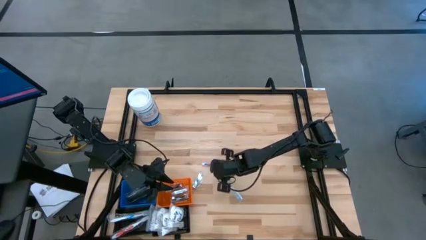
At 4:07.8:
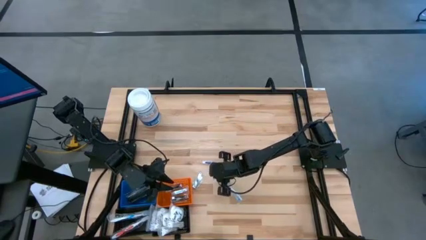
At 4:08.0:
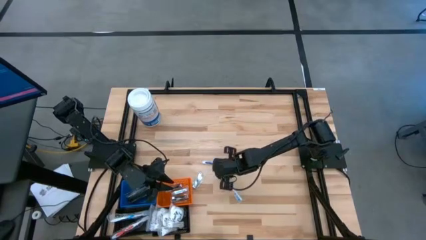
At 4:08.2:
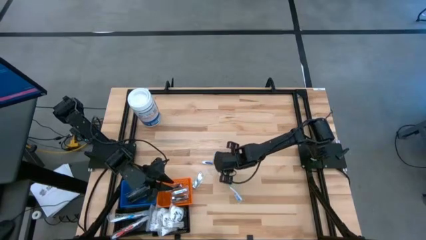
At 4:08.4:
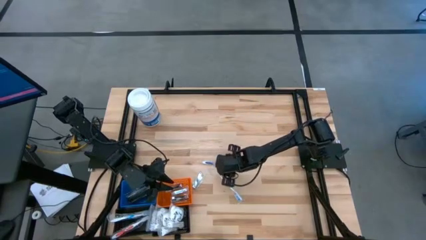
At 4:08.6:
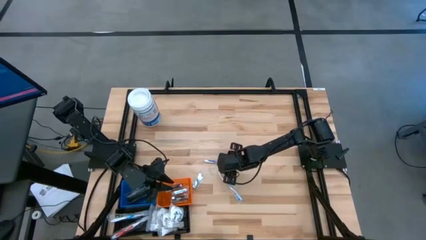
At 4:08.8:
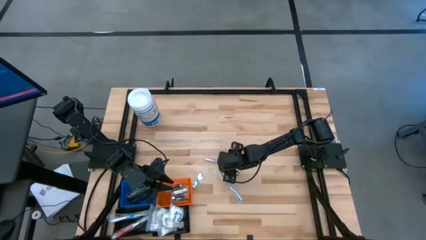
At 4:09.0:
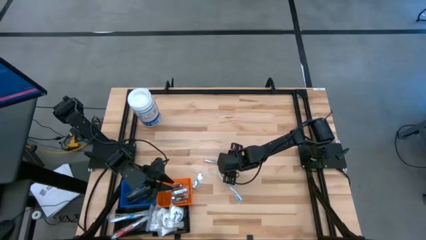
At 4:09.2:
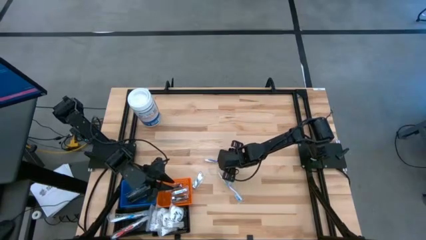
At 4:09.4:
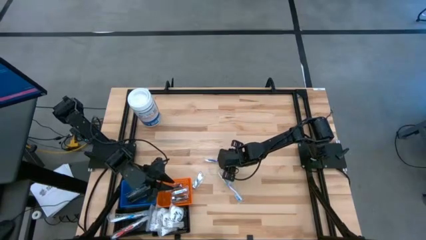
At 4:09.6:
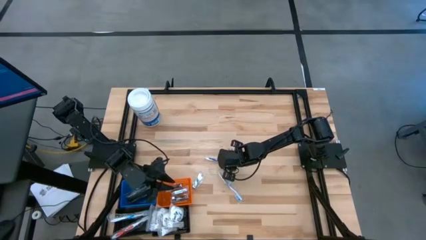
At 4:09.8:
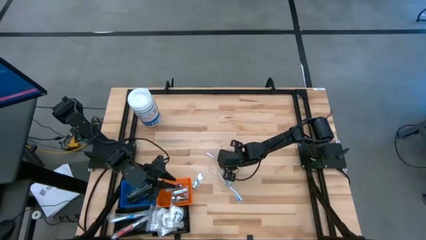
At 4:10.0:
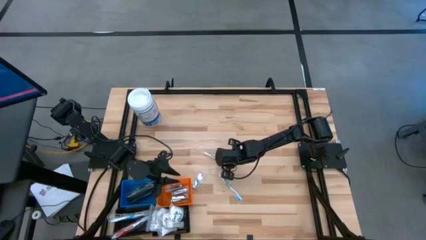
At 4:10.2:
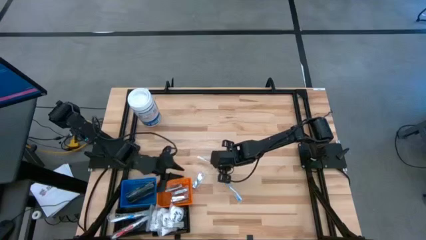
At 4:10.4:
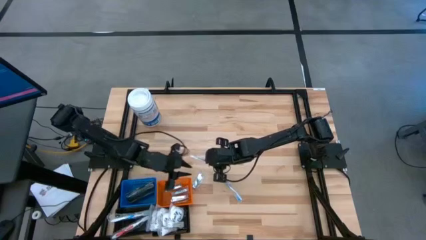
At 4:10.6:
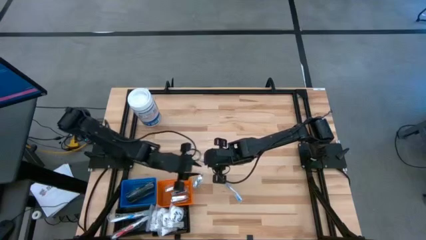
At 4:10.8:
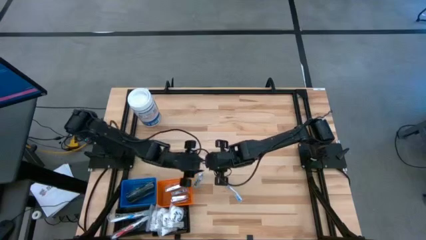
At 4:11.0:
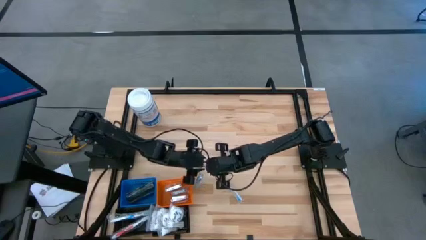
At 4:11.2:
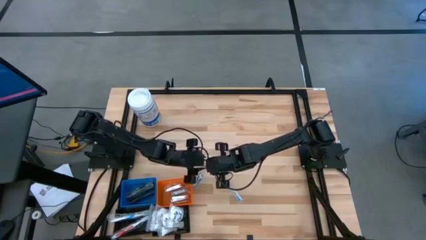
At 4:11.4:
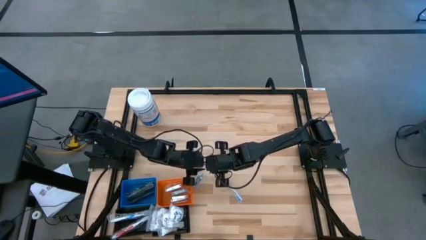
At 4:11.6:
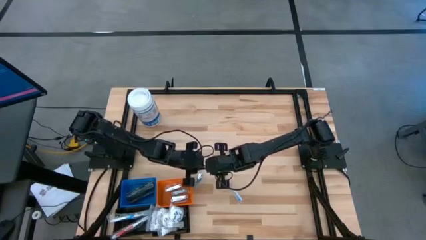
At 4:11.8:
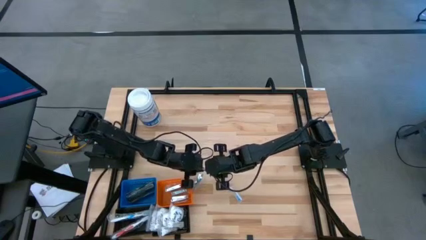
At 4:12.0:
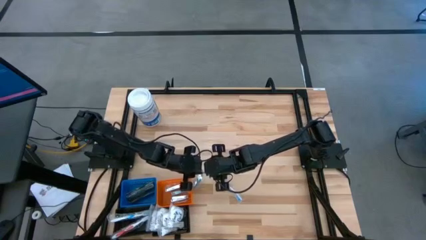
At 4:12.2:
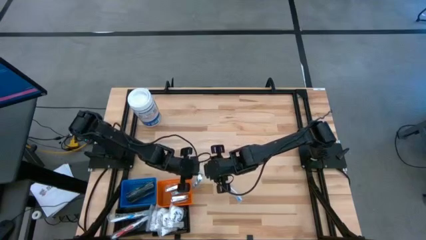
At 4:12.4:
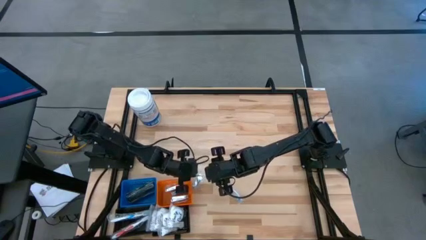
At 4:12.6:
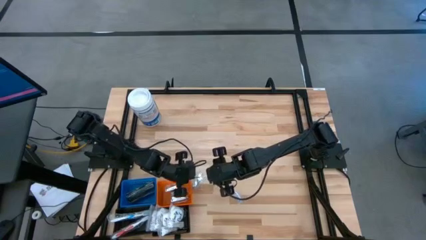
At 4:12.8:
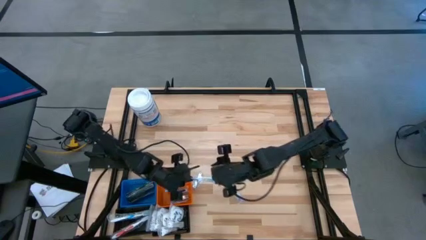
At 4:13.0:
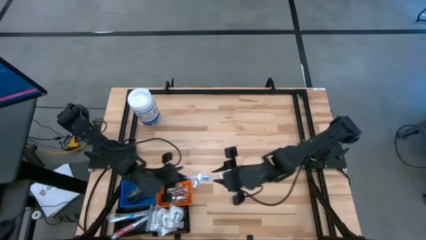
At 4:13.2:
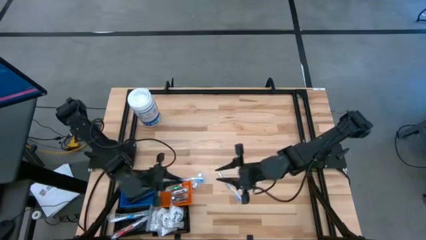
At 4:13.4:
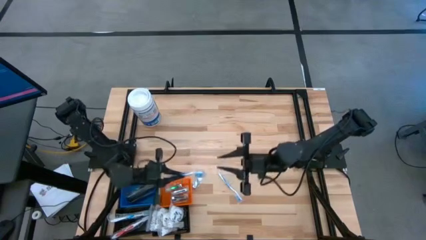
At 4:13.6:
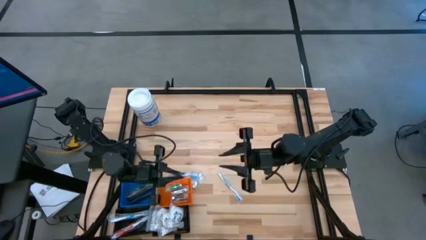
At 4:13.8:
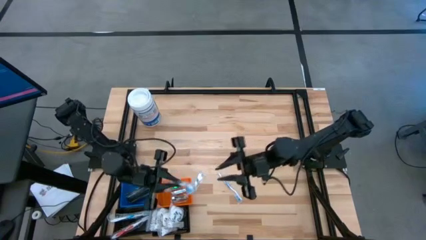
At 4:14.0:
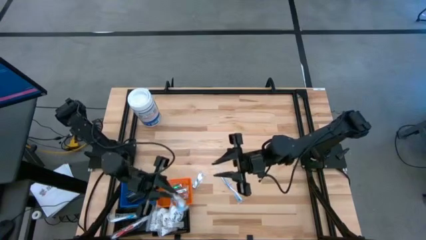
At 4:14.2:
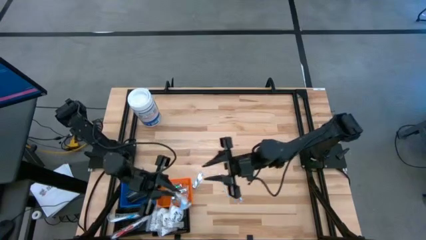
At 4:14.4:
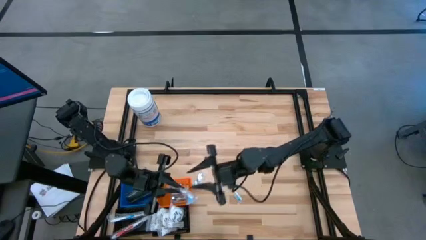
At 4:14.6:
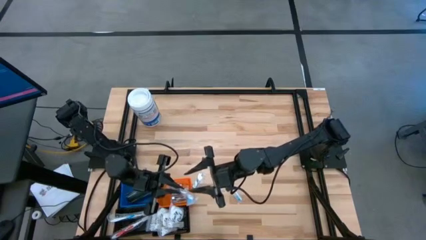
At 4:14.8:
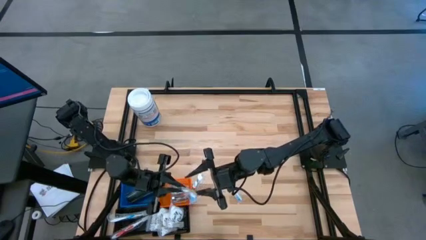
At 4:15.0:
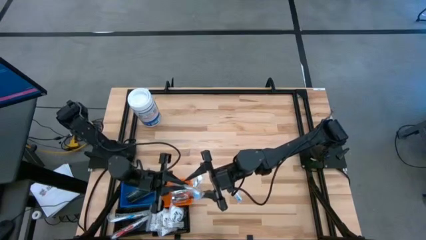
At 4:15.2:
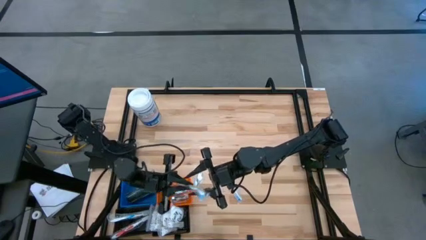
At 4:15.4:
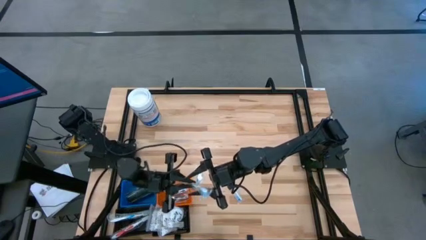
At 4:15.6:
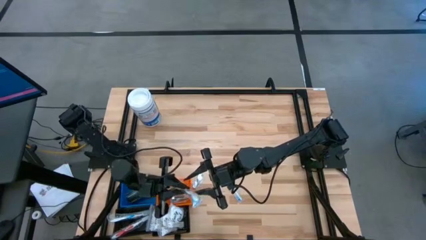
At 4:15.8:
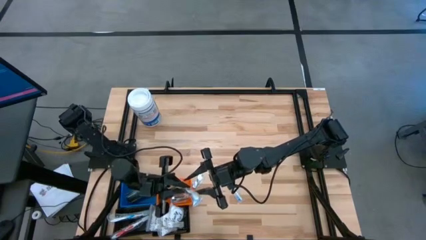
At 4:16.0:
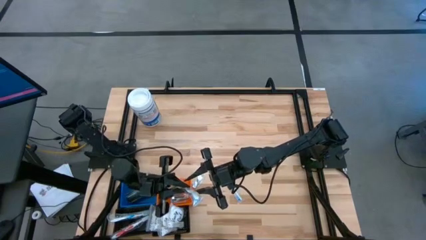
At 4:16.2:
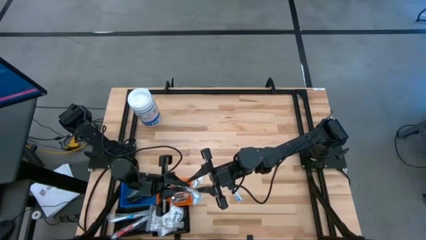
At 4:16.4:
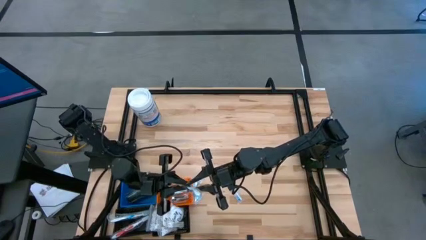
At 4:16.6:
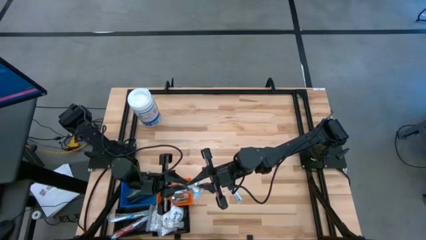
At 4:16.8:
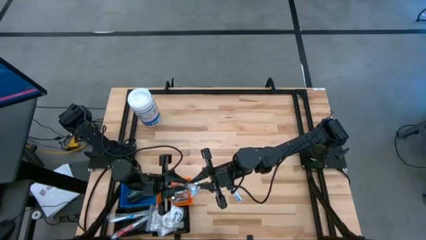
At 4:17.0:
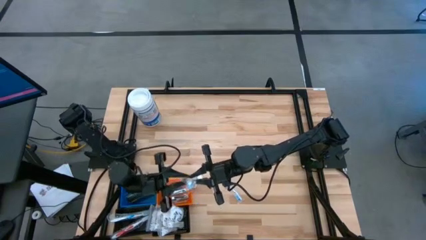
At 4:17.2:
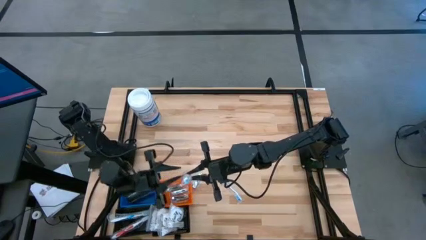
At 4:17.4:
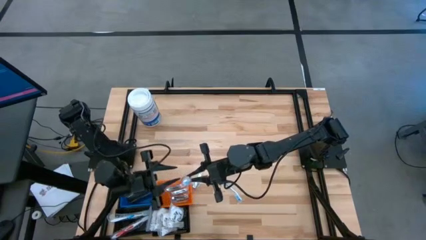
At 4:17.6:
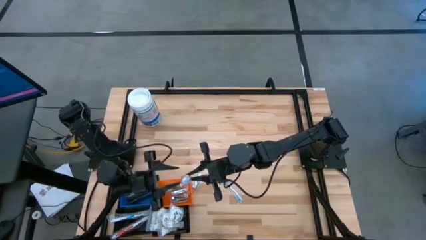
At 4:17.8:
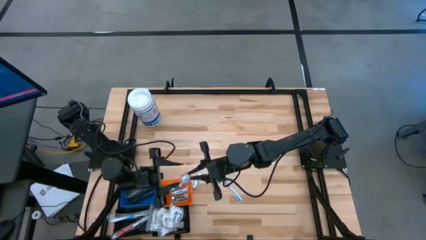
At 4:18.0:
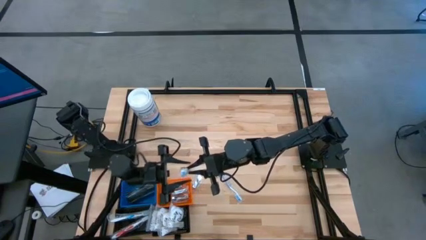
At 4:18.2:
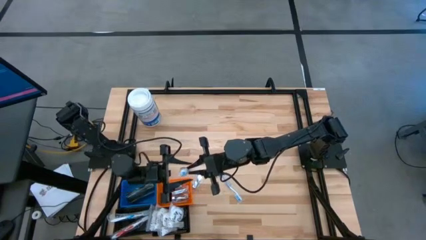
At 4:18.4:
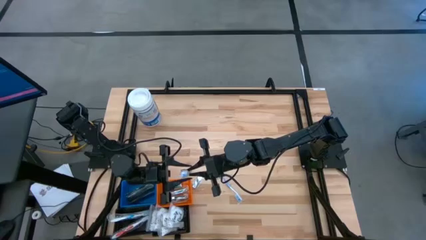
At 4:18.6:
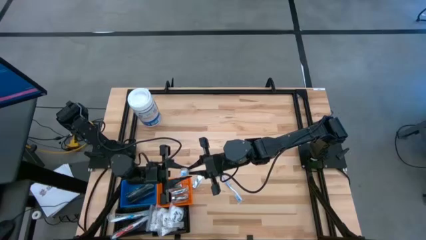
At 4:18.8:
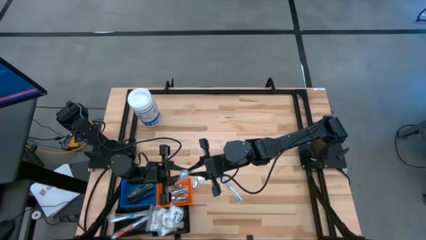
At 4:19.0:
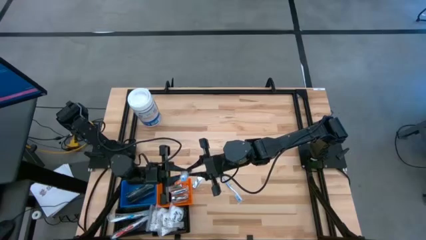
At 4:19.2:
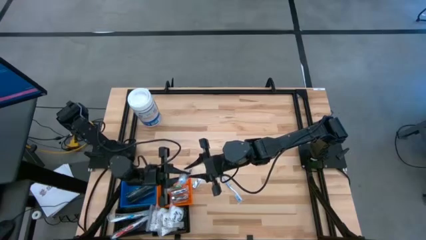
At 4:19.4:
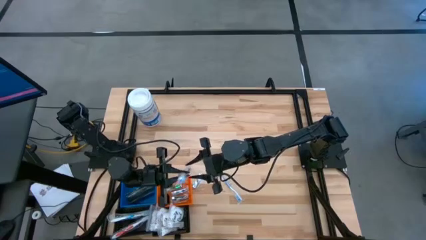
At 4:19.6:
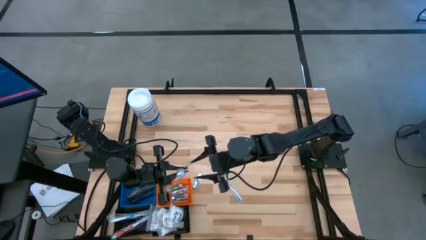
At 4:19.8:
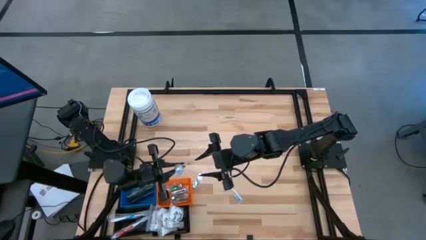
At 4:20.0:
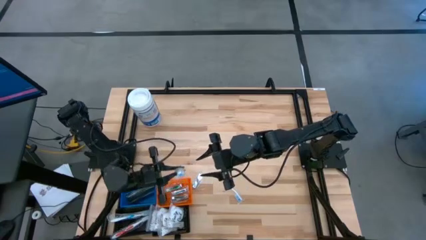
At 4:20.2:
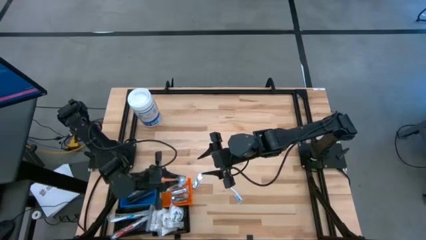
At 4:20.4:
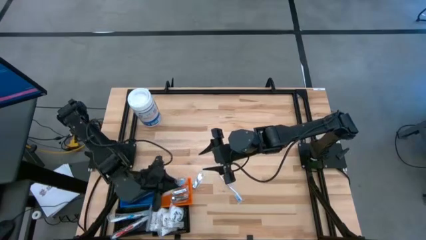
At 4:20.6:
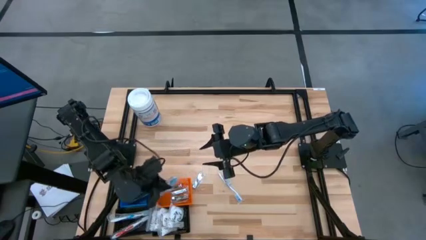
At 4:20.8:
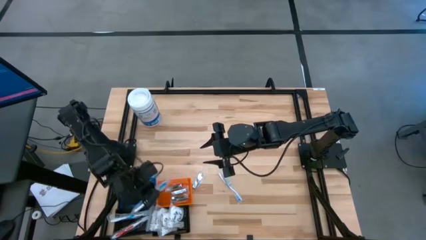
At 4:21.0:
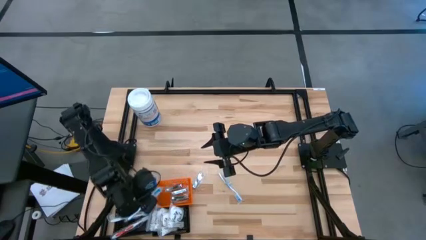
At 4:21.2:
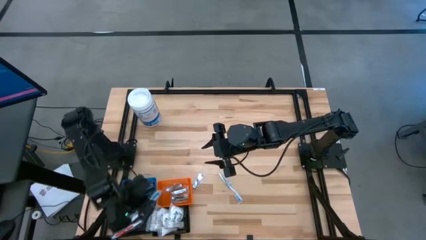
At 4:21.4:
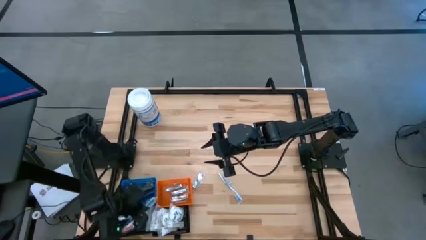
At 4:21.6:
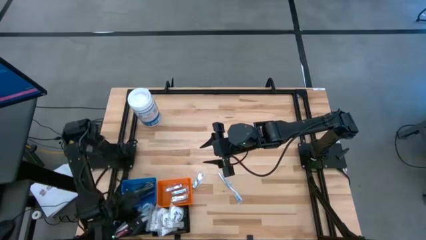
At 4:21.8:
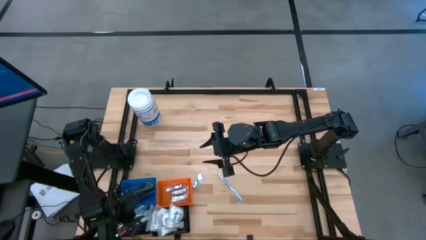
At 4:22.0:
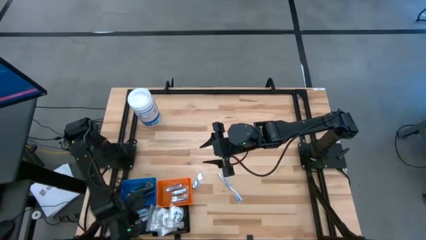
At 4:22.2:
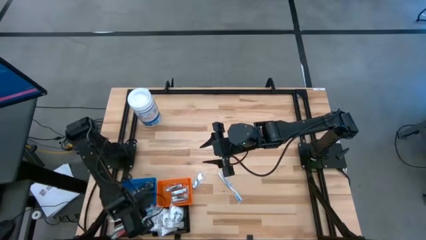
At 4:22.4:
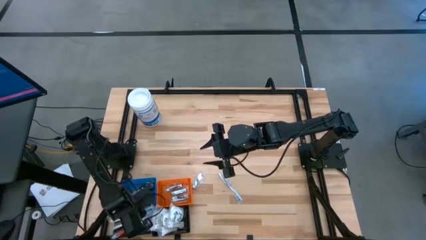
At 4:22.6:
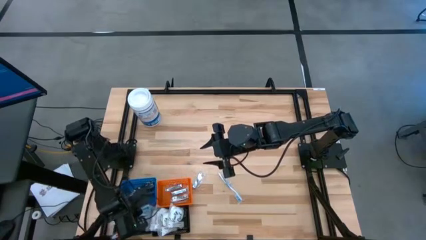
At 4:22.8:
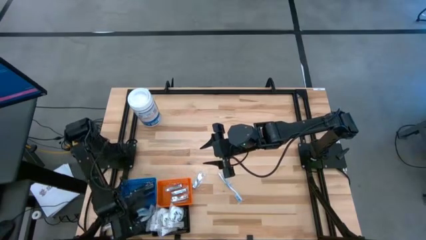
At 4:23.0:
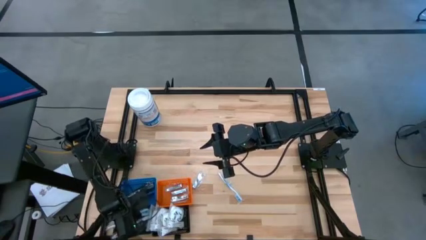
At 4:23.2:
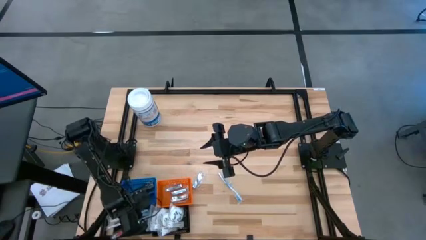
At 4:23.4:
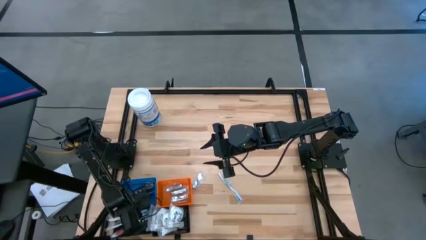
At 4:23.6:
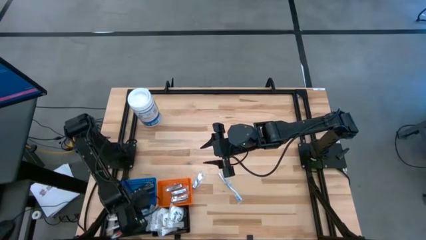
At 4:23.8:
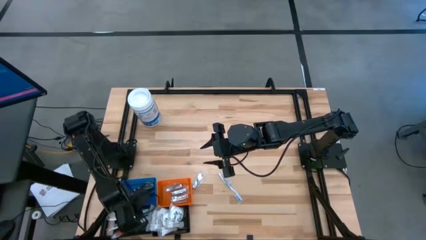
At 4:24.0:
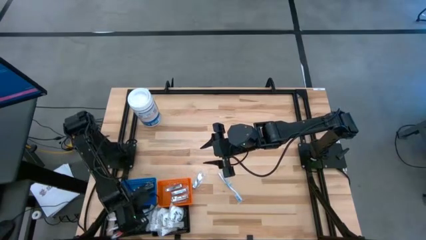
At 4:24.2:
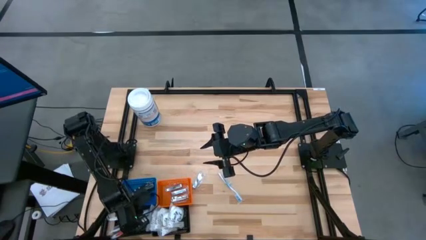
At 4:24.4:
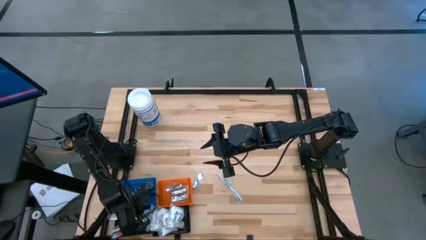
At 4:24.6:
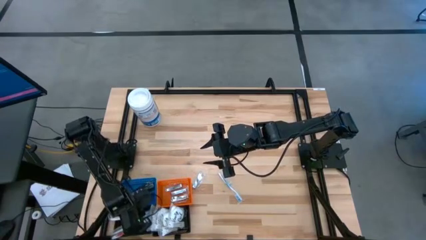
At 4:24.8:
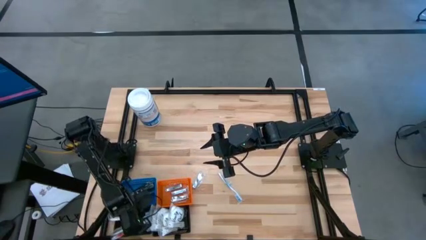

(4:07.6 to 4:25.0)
Task: Pick & Place Travel size toiletries
Put the top blue toothbrush into the left black basket
